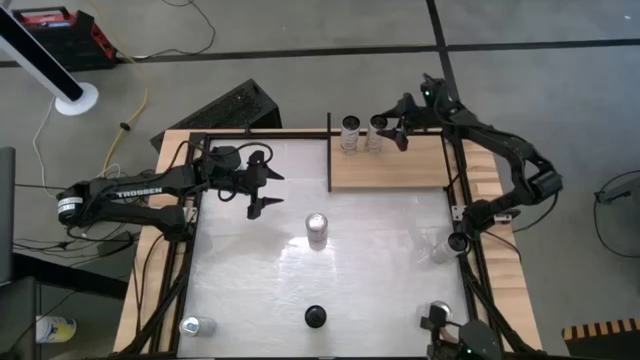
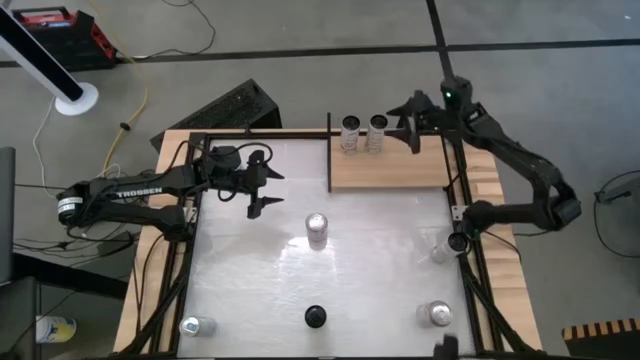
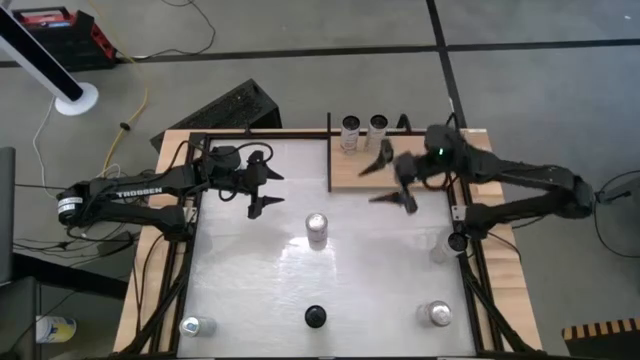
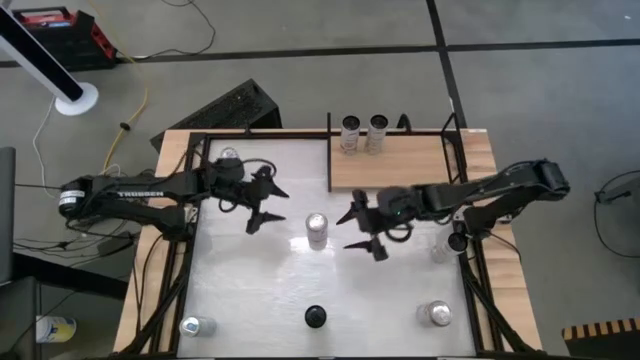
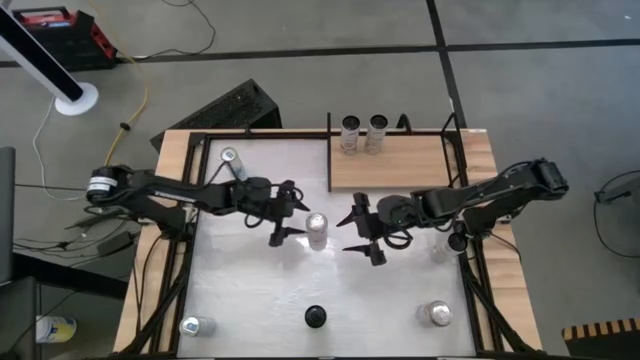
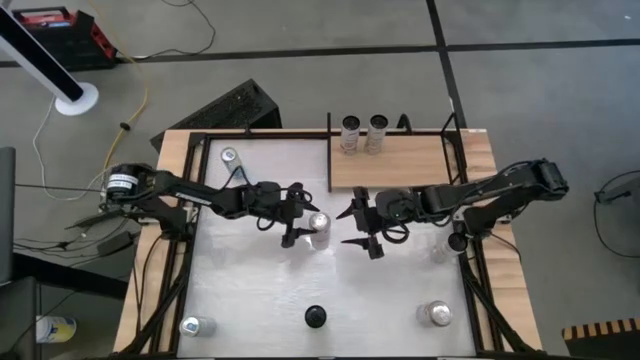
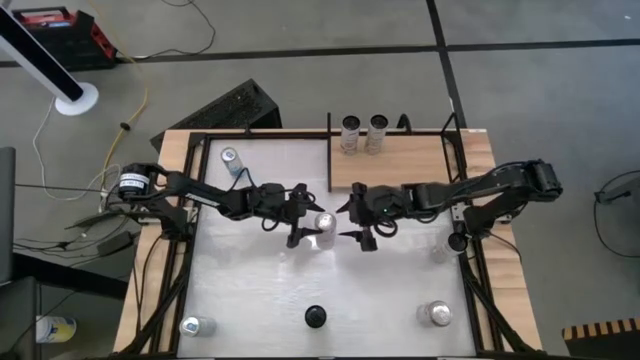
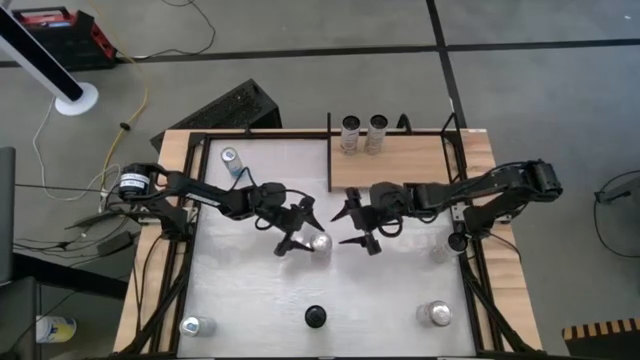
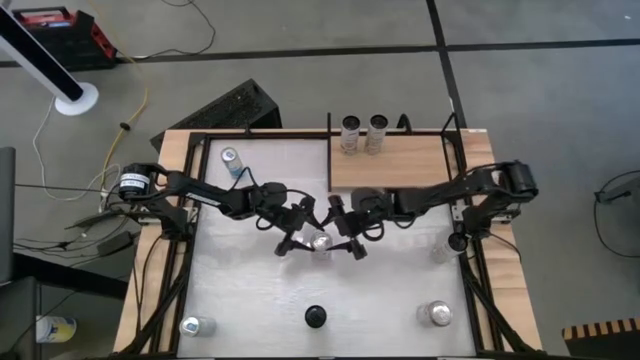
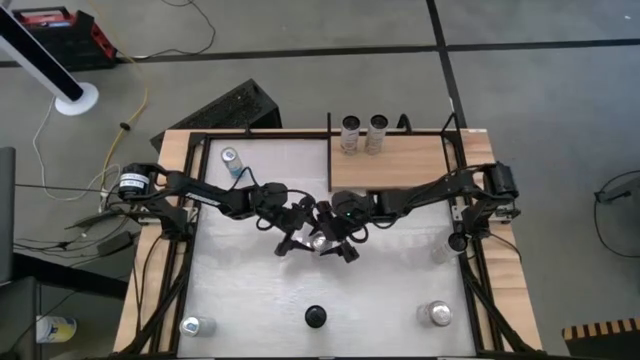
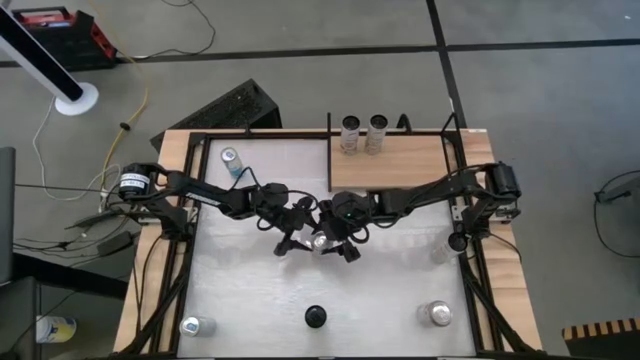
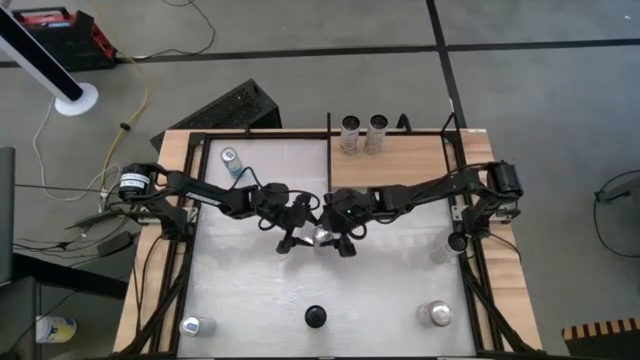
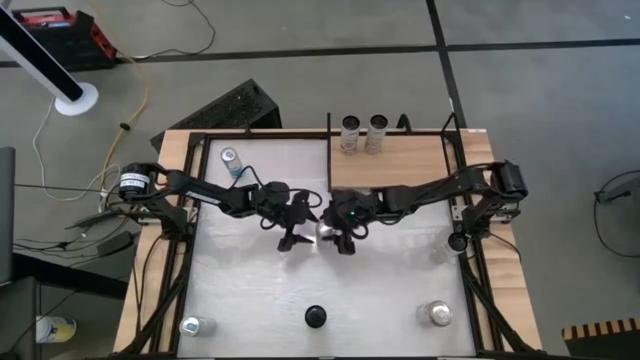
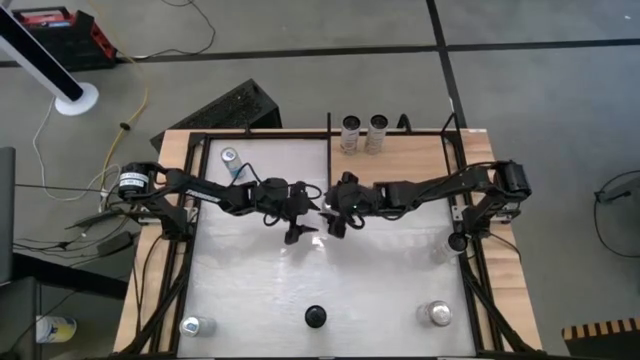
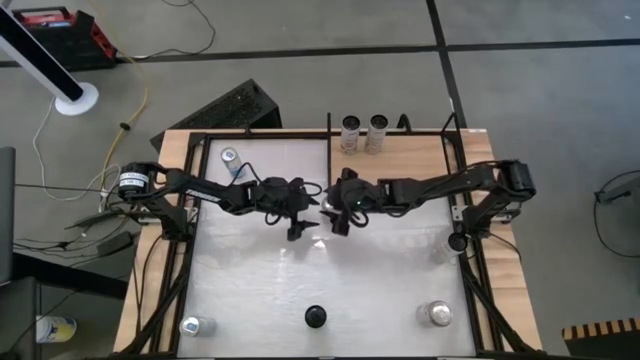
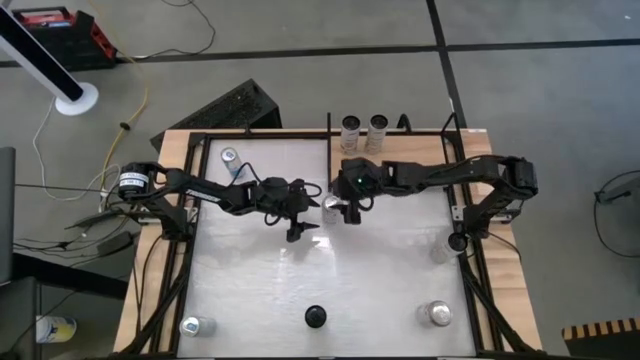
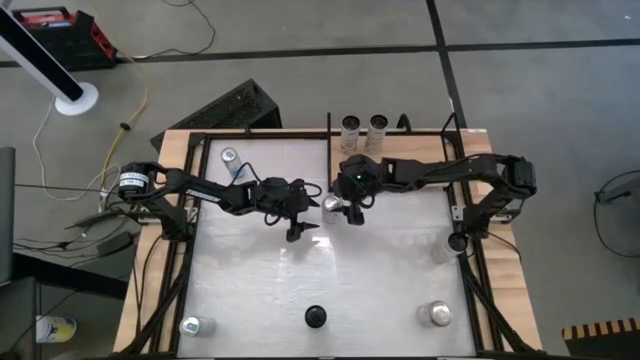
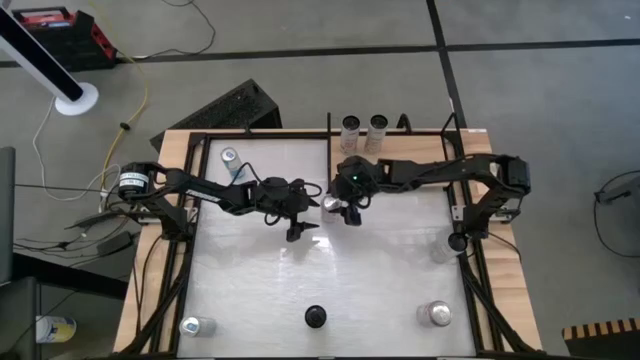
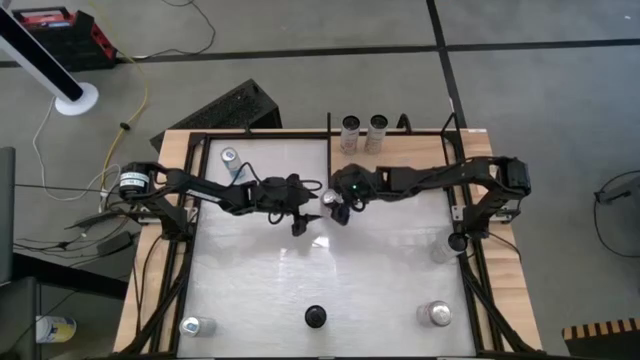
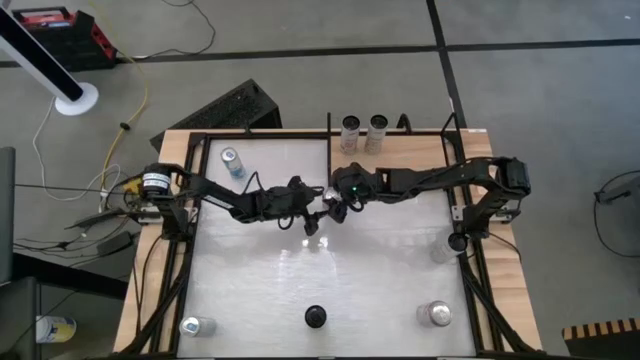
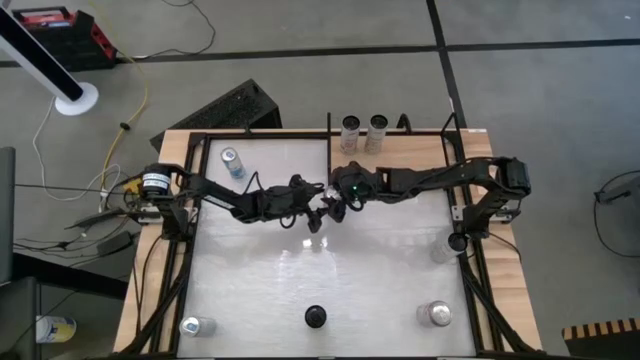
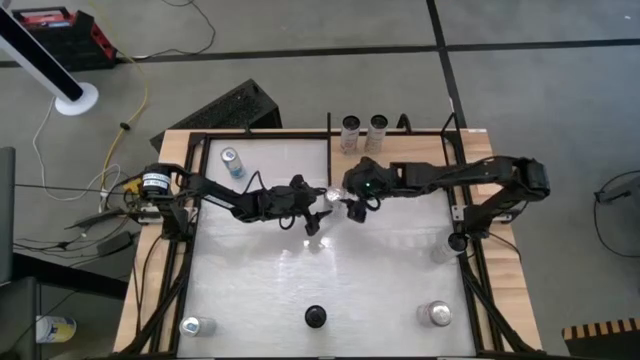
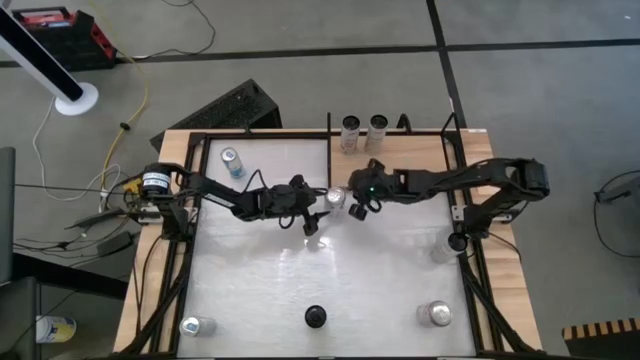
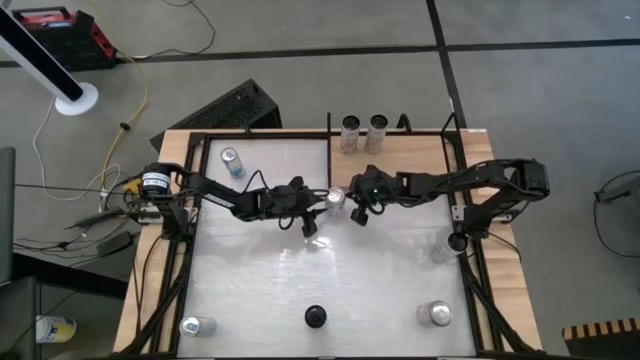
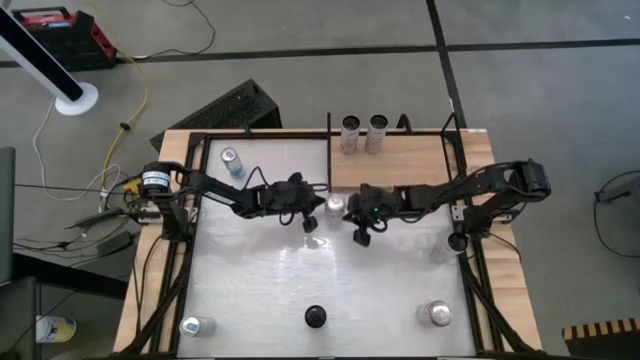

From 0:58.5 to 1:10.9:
Task: Place canned beverage on shelf
Put the top silver soda can on the shelf

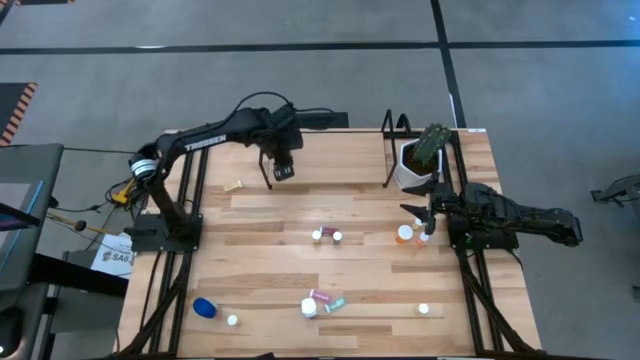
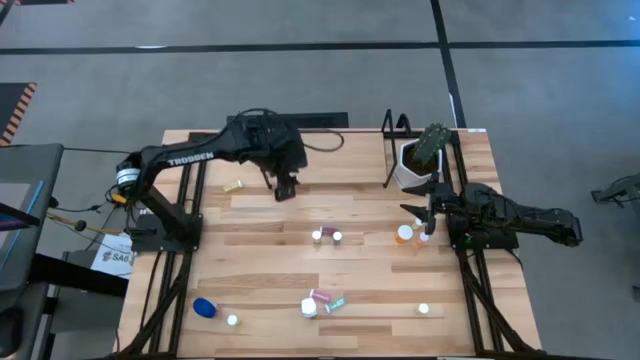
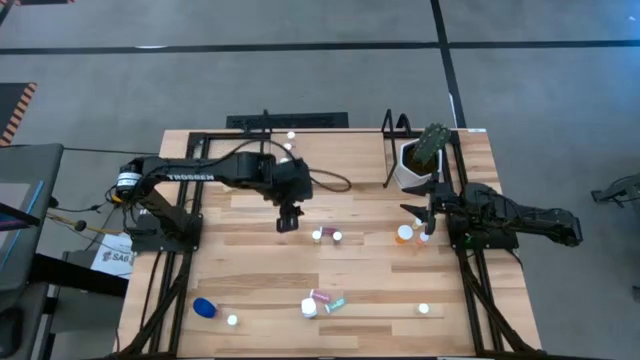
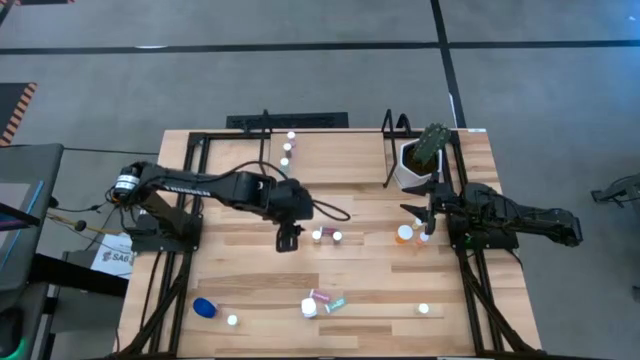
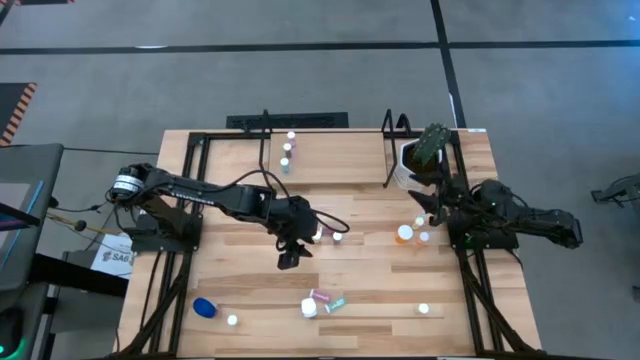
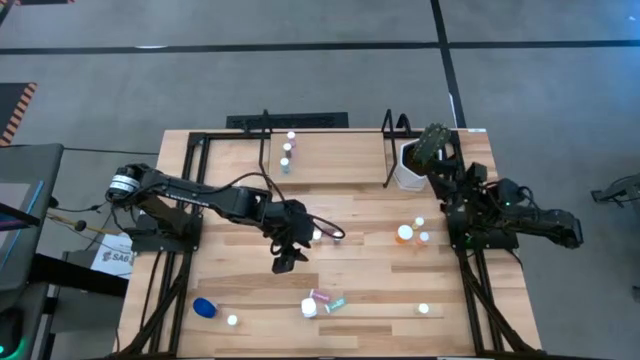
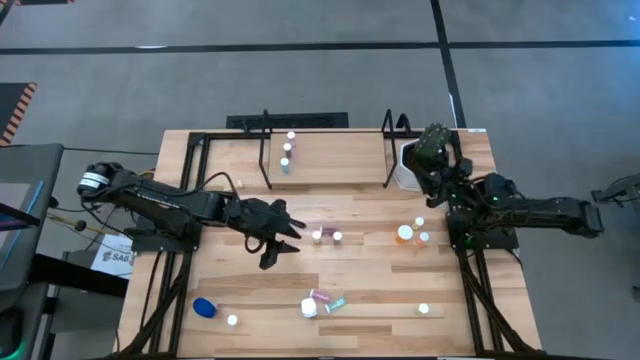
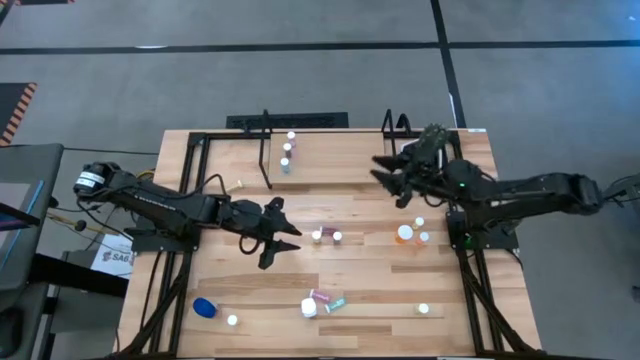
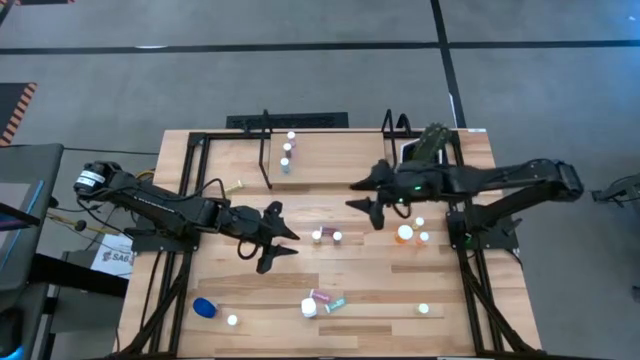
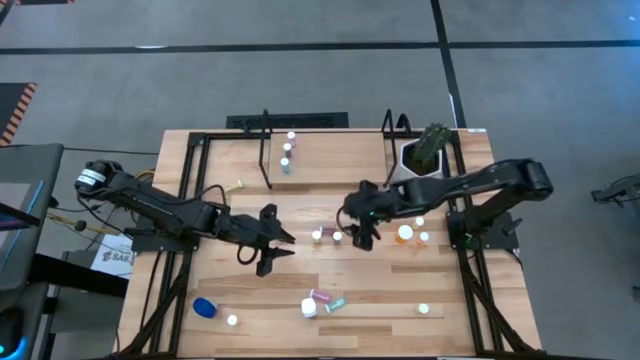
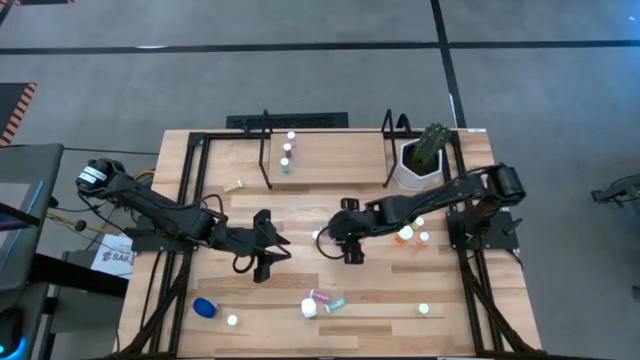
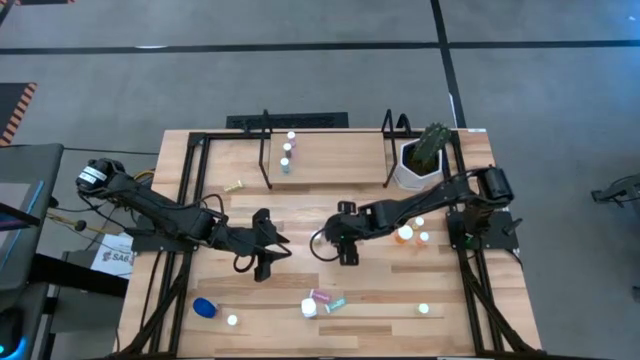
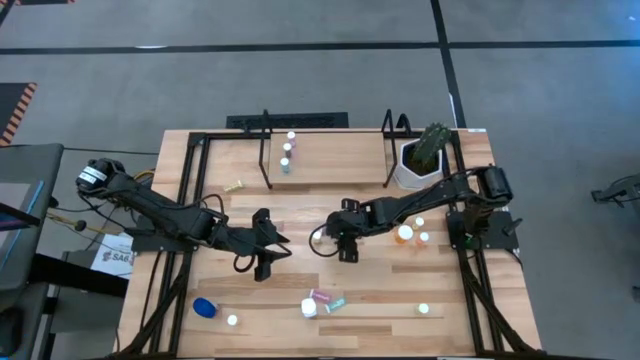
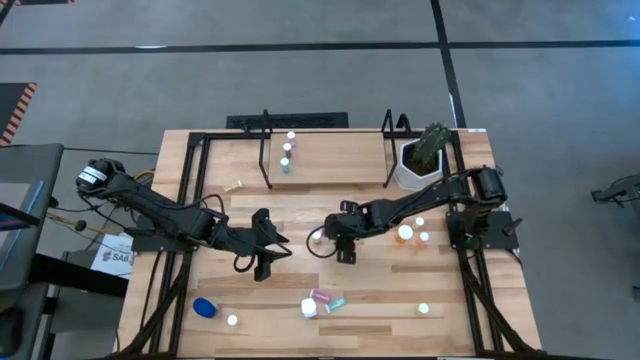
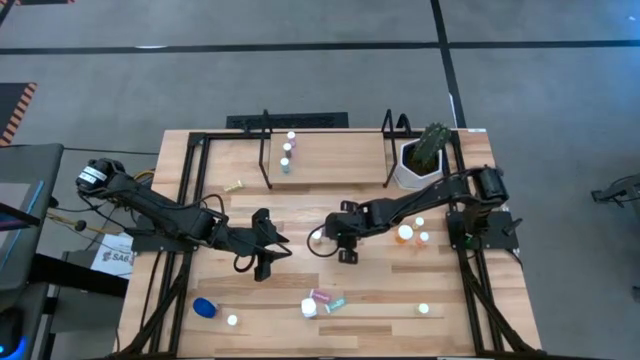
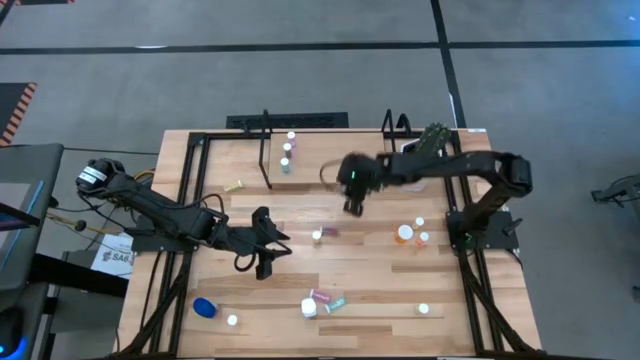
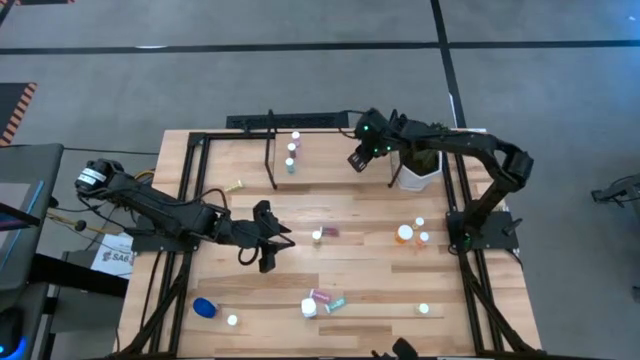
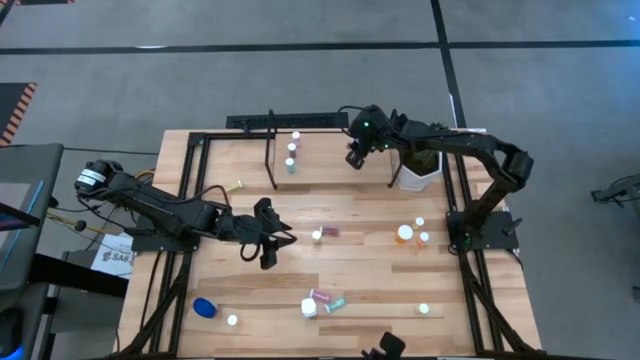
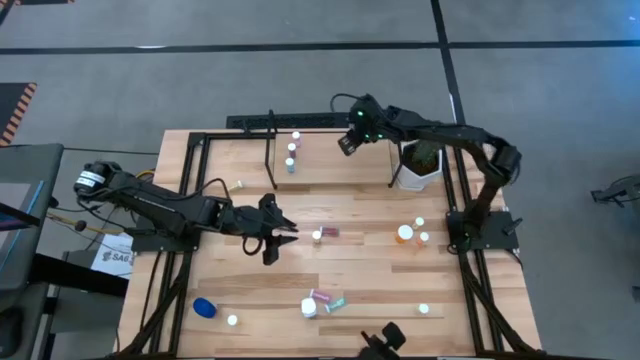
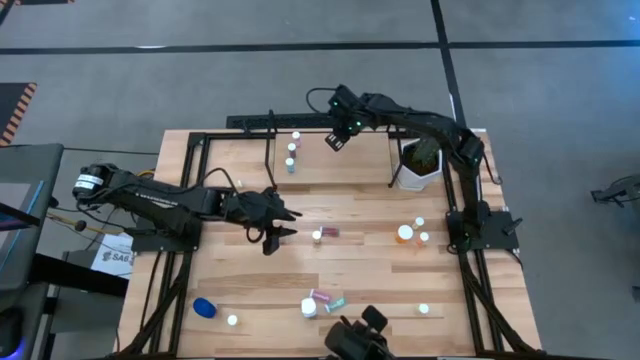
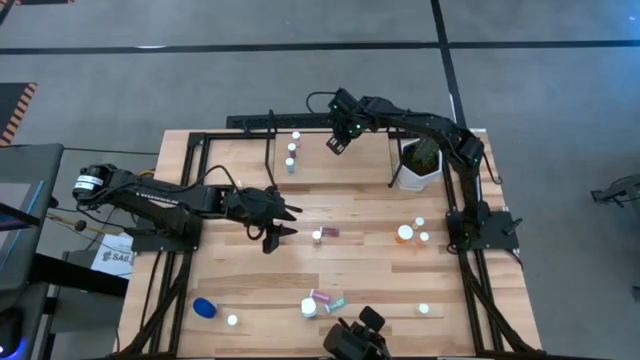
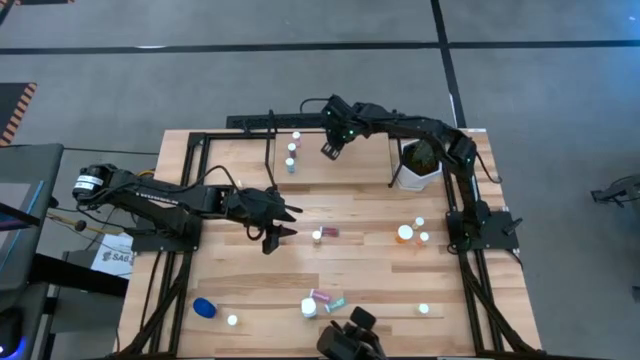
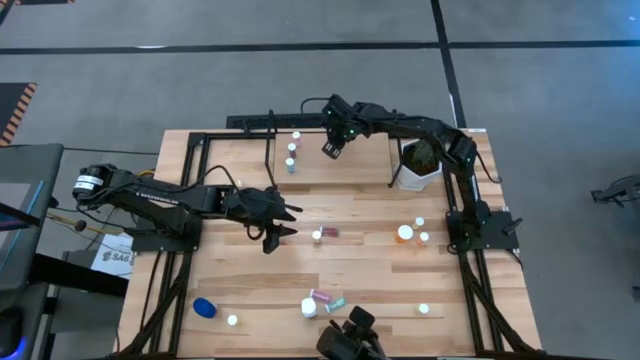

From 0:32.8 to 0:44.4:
Task: Pick and place medicine bottles onto shelf by color
Put the blue pill bottle on the shelf
